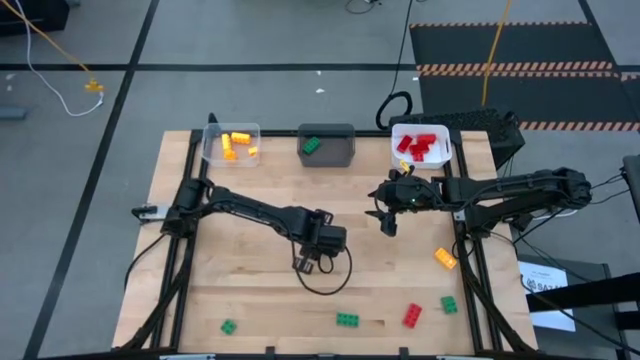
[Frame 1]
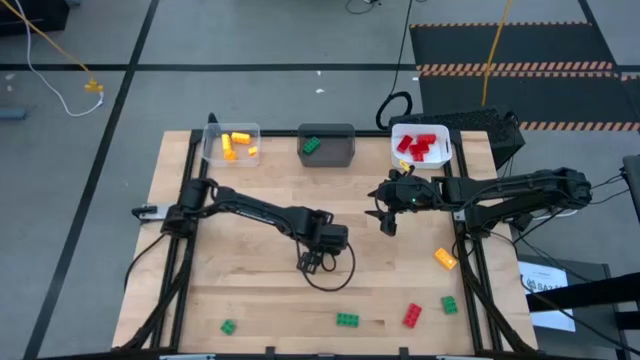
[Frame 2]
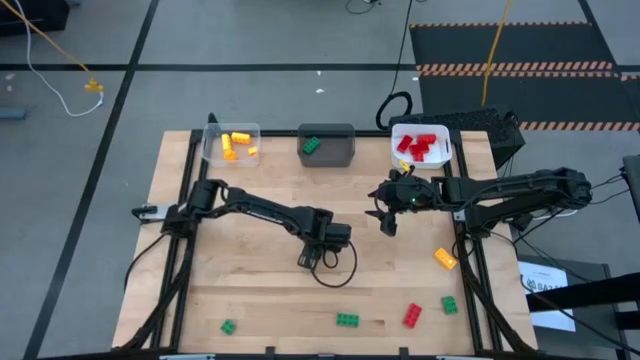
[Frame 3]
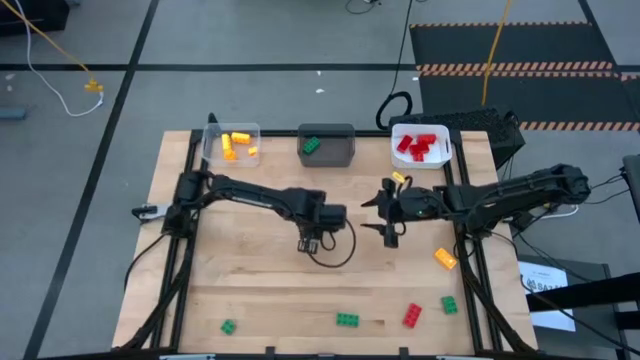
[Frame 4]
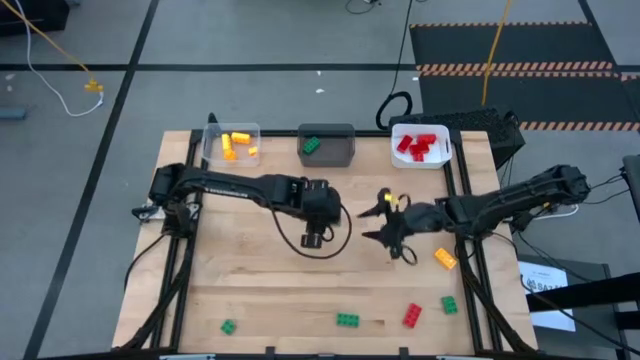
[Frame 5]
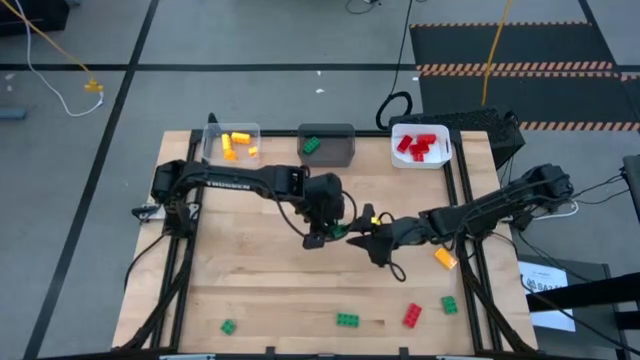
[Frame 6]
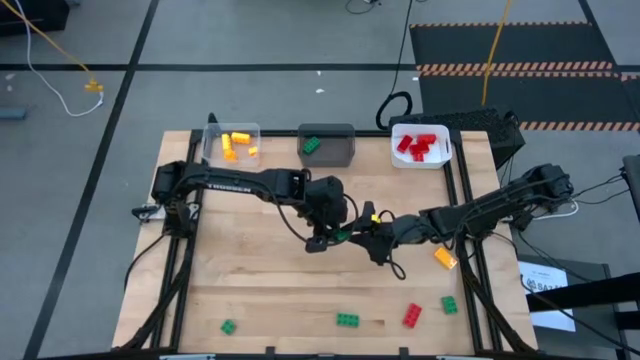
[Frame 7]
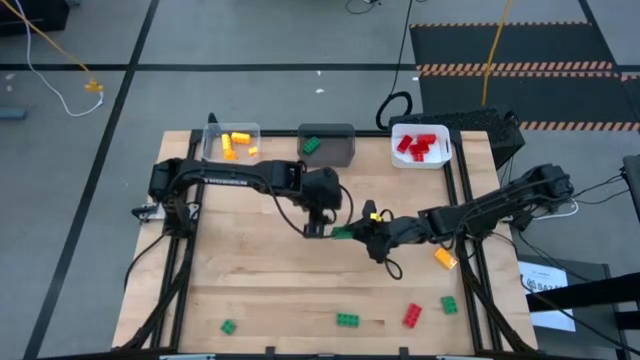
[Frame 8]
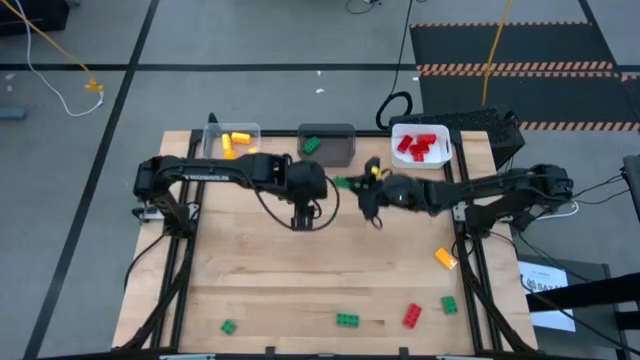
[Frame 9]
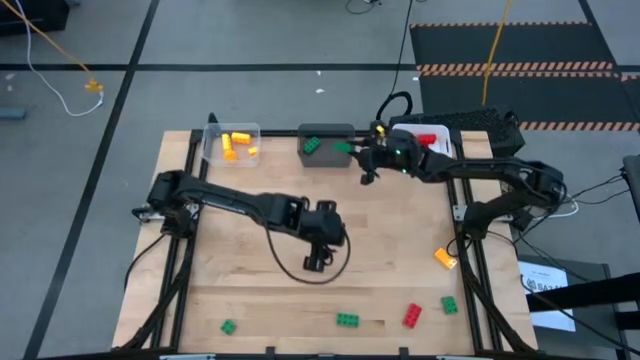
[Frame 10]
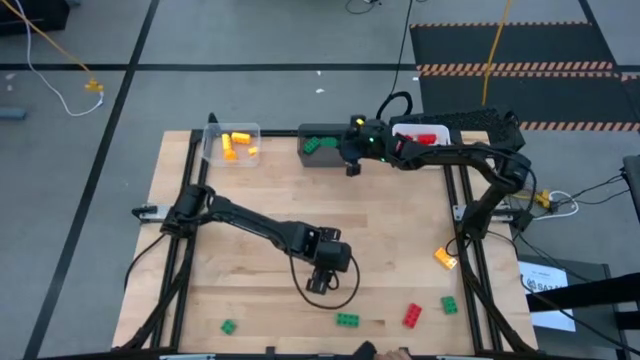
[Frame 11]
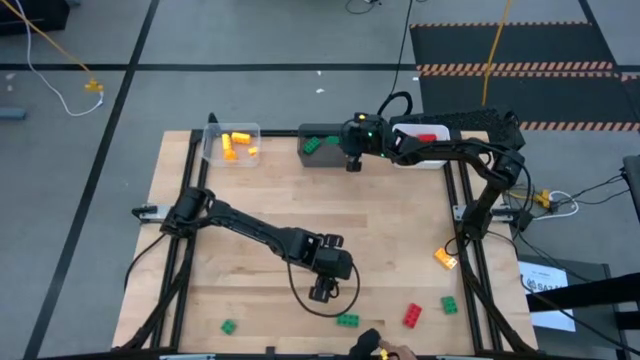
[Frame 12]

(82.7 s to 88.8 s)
Task: Sort & place blocks by color
Put the left 8 stud green game piece into the gray bin

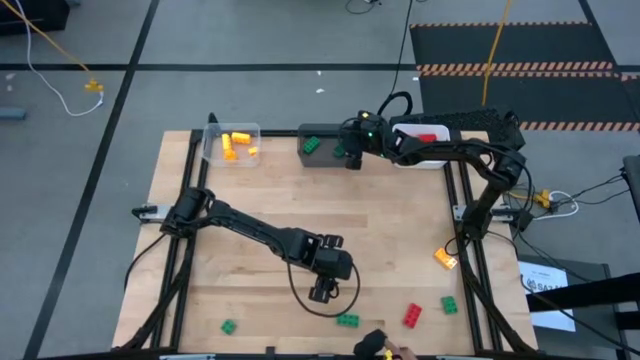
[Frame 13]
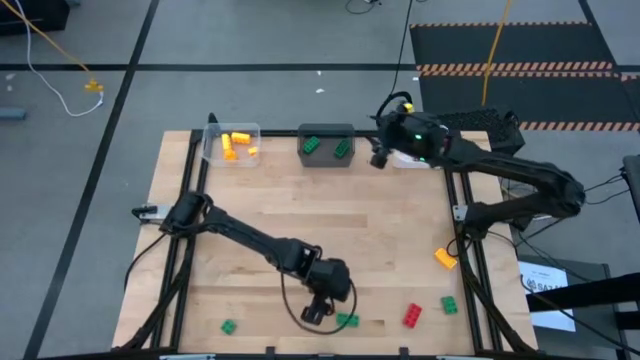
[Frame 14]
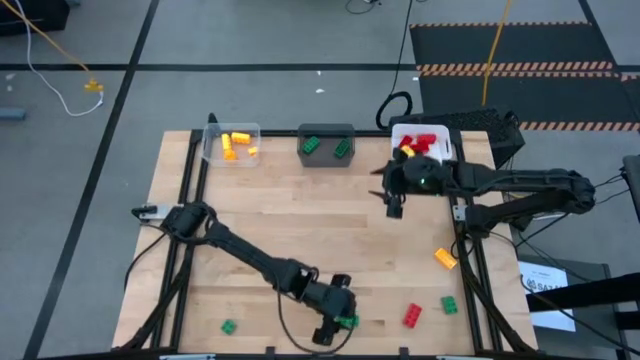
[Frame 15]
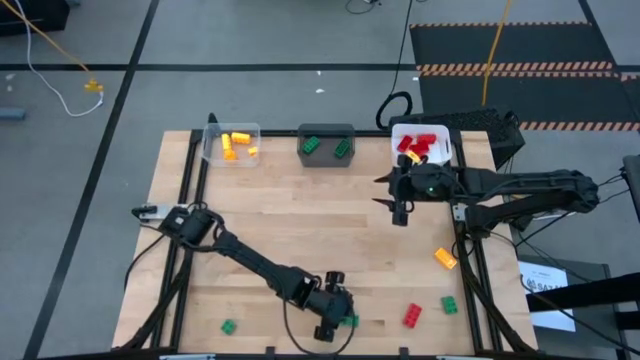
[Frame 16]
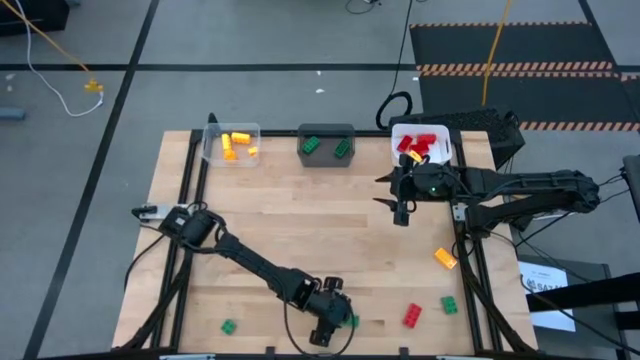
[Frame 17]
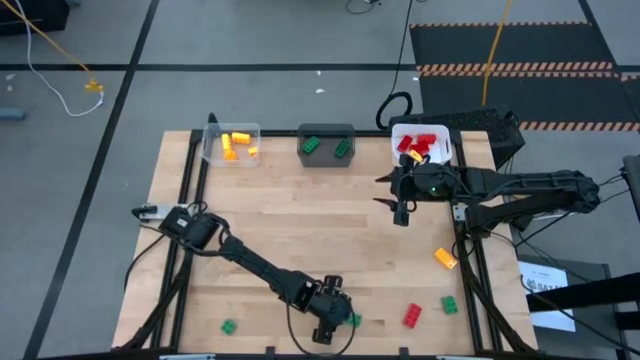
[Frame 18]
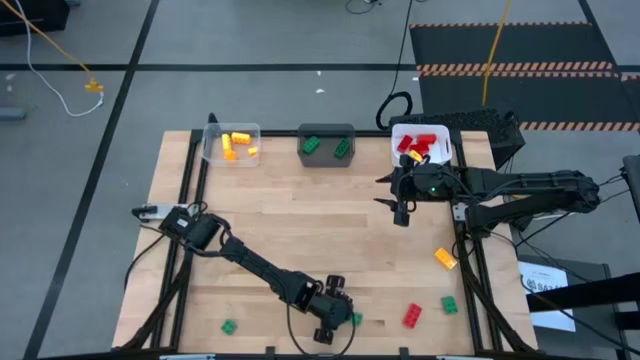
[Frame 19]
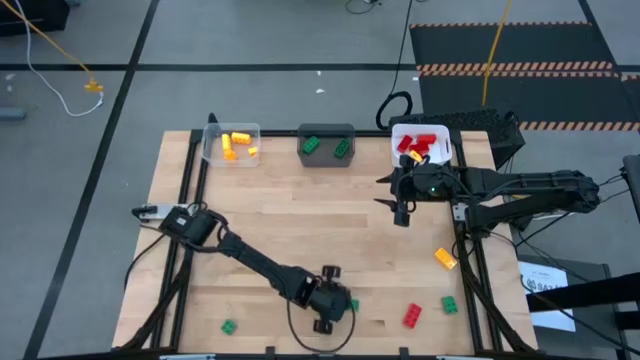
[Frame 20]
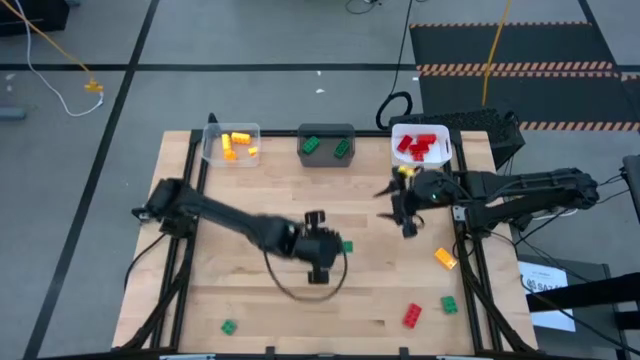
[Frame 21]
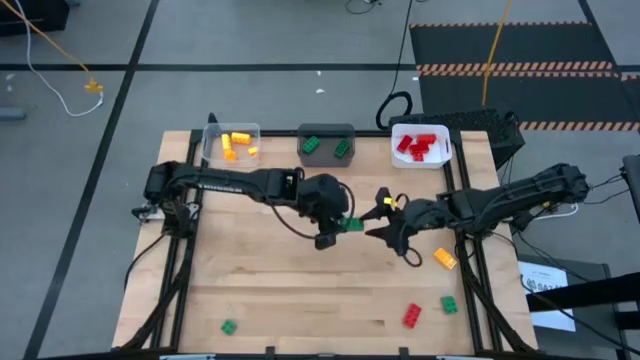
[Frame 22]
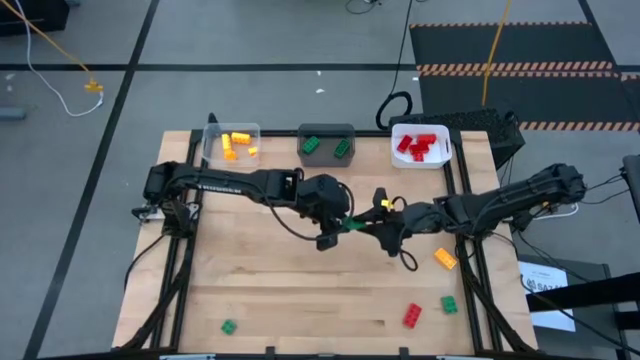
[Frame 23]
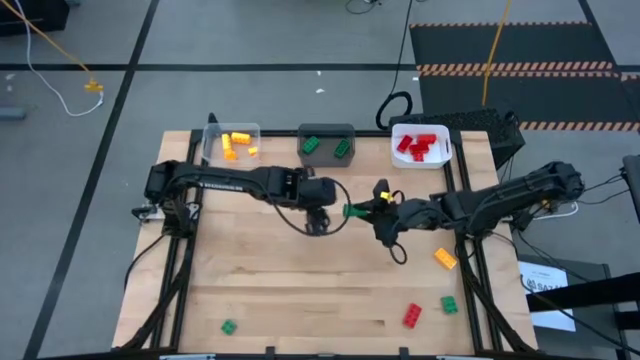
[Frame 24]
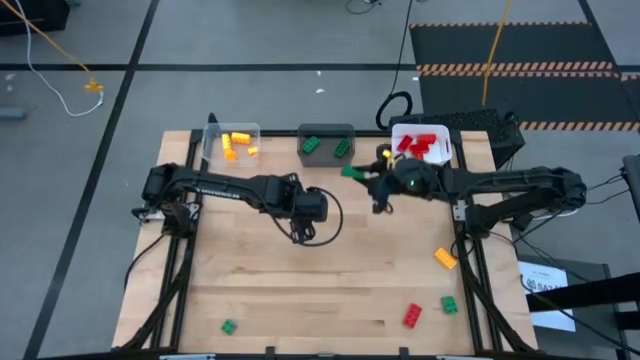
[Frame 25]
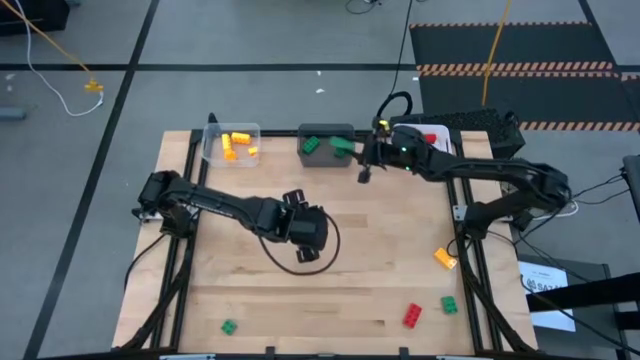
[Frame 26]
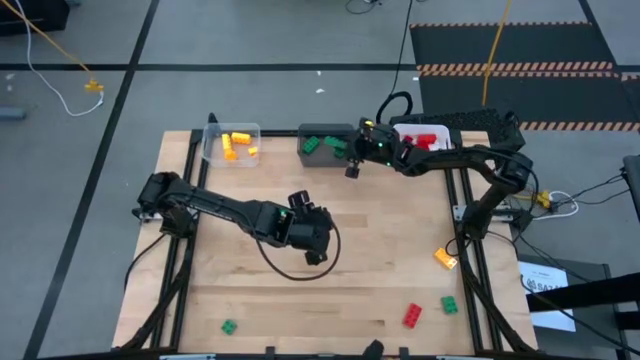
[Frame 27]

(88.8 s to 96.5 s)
Put the 8 stud green game piece into the gray bin

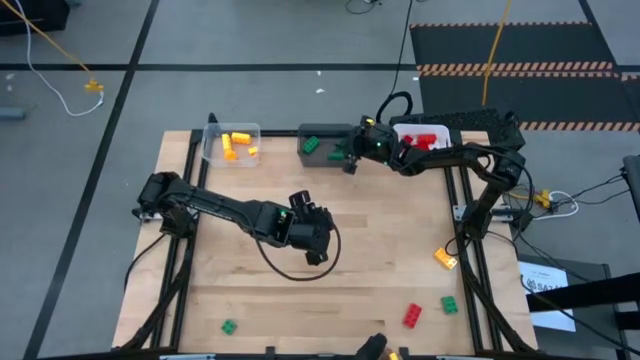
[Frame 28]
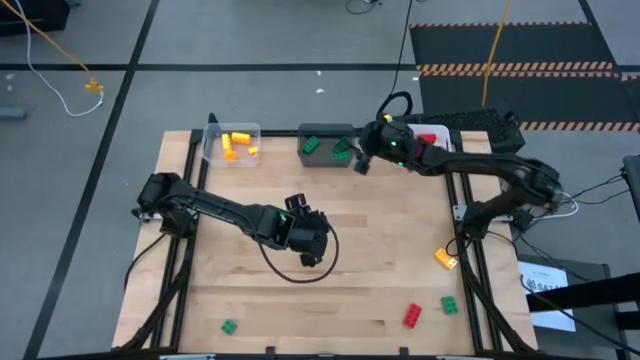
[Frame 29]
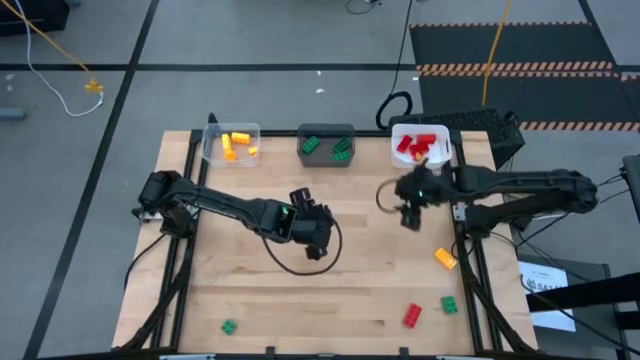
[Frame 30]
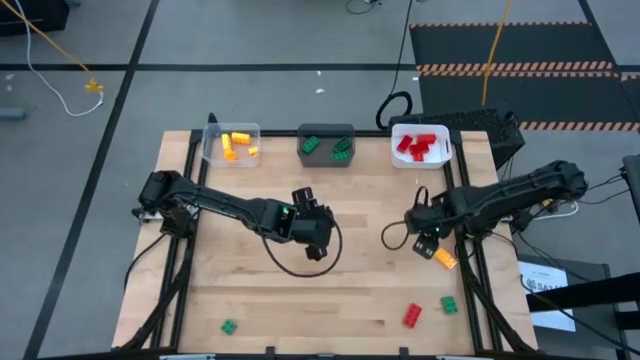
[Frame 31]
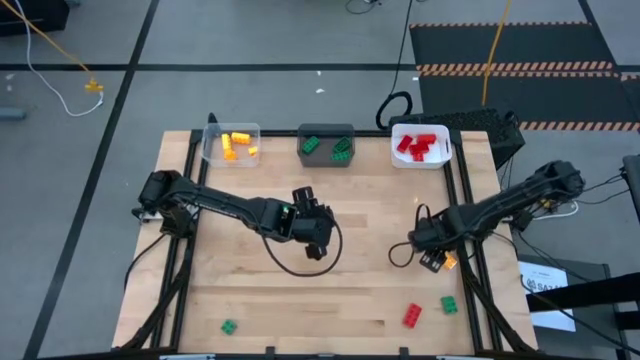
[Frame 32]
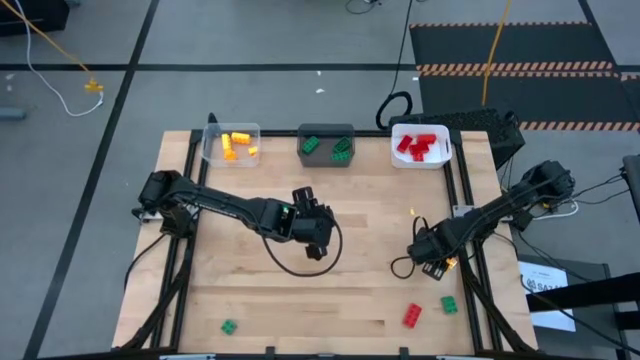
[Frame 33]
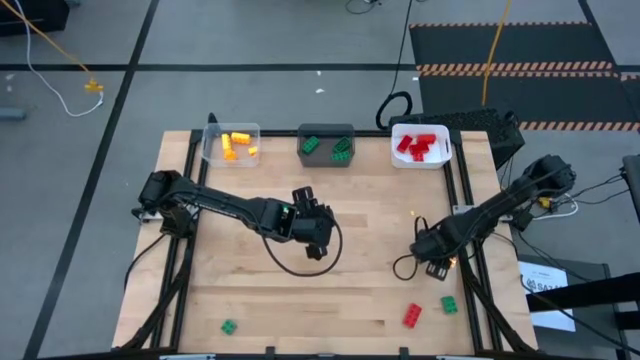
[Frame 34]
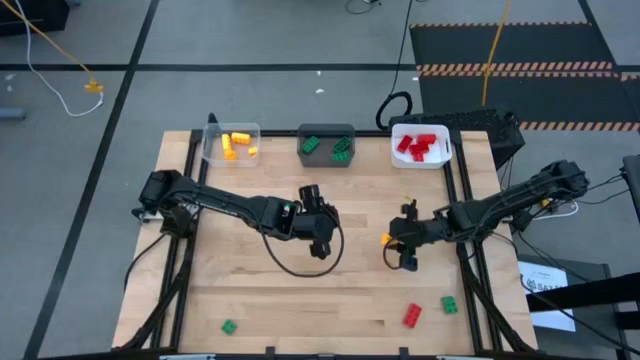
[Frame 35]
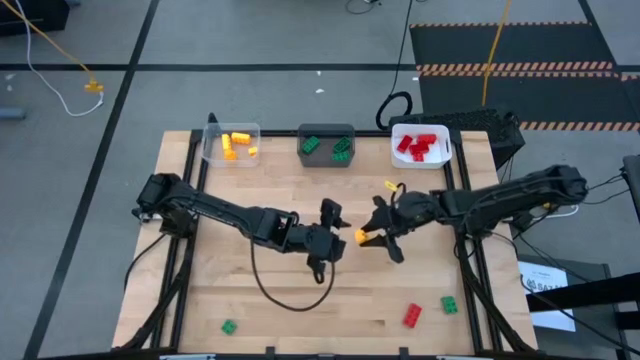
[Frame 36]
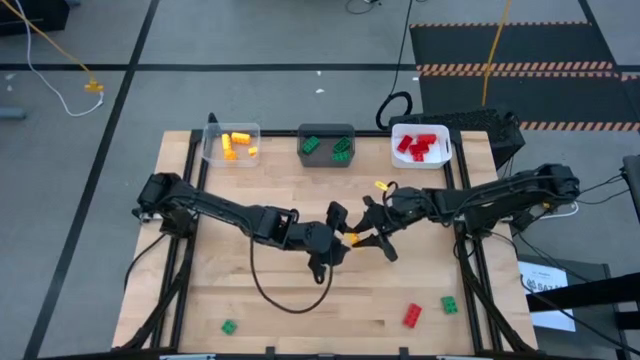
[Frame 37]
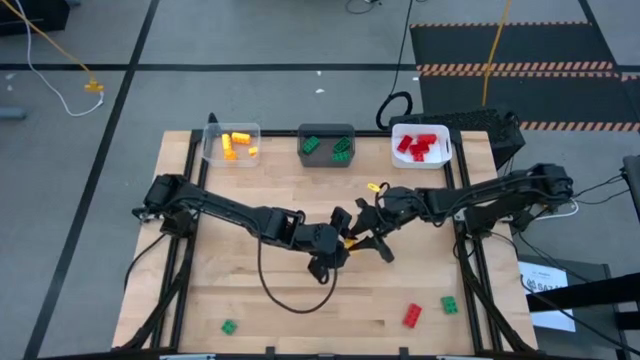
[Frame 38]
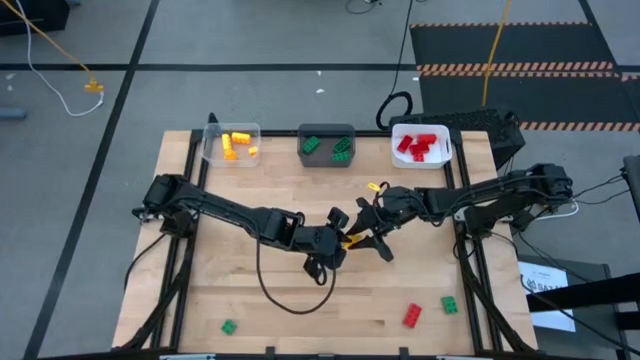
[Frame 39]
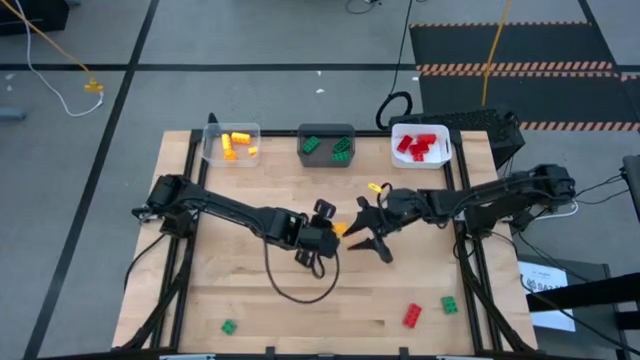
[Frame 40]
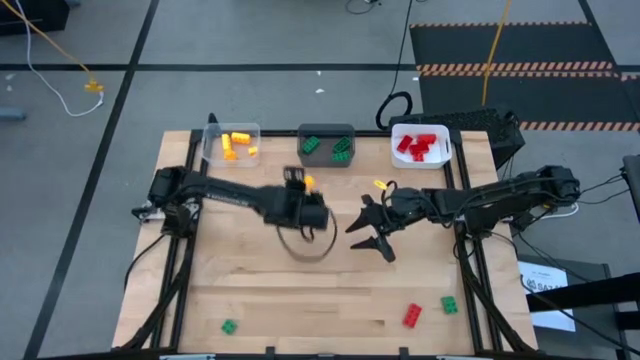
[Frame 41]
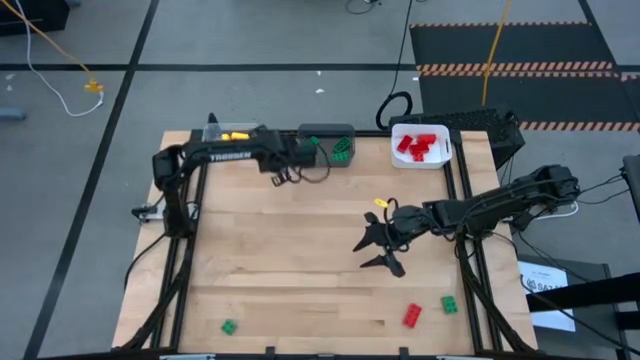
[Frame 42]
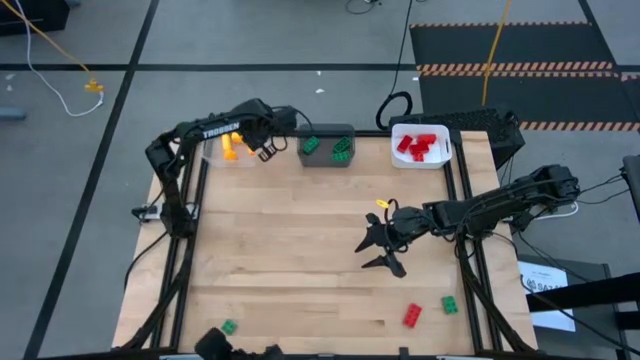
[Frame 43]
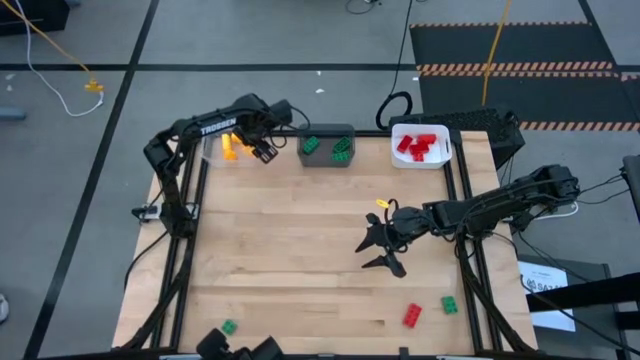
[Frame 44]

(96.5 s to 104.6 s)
Put the 8 stud yellow game piece into the transparent bin
